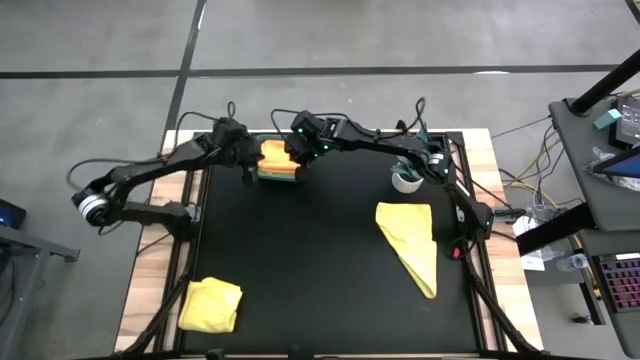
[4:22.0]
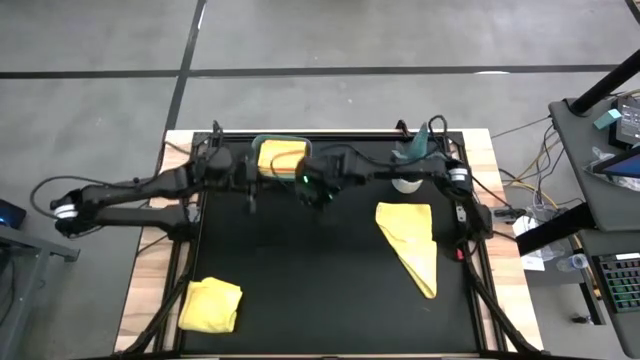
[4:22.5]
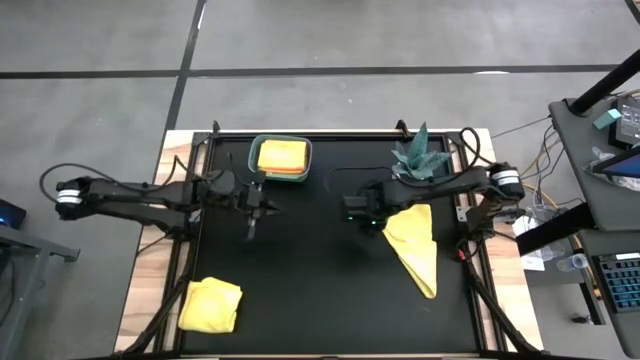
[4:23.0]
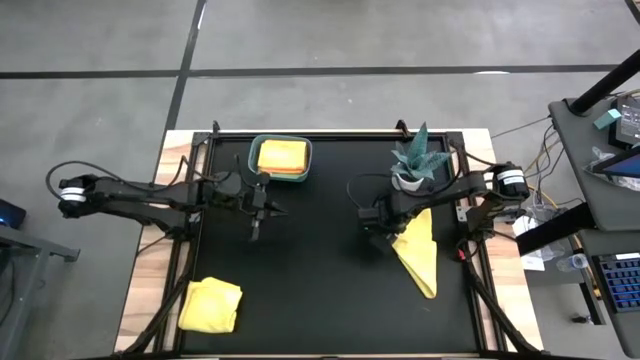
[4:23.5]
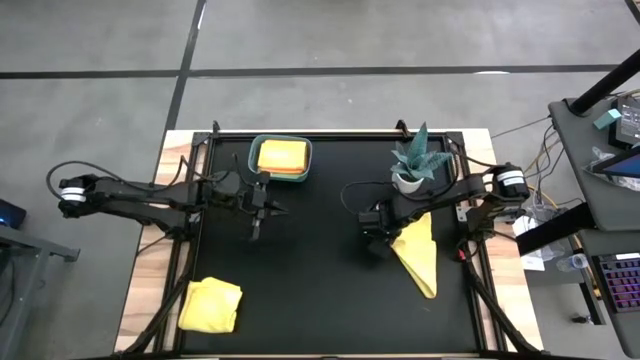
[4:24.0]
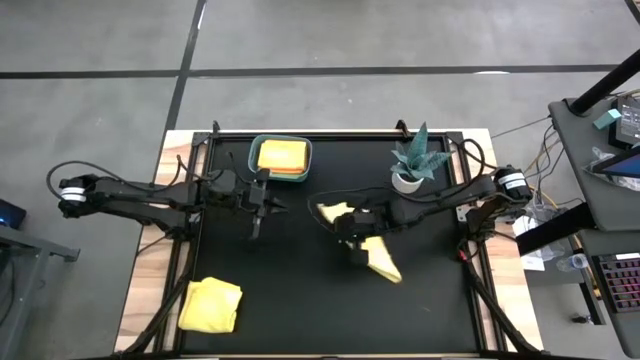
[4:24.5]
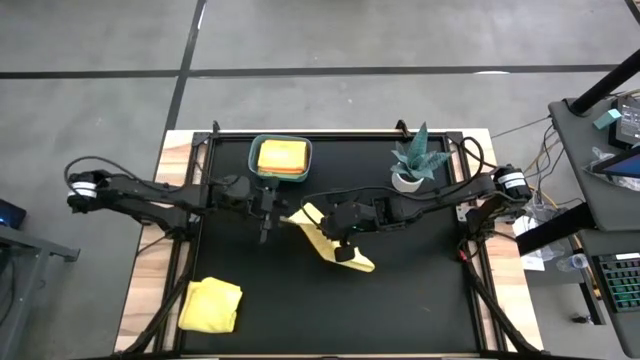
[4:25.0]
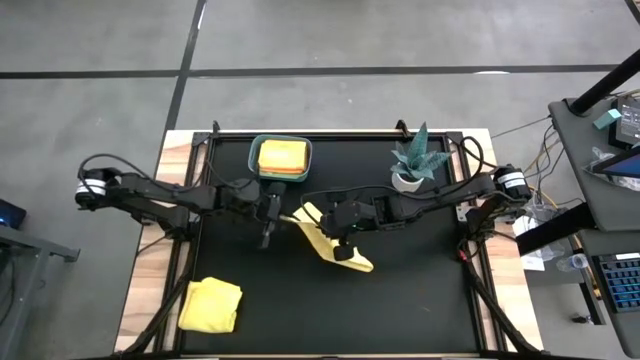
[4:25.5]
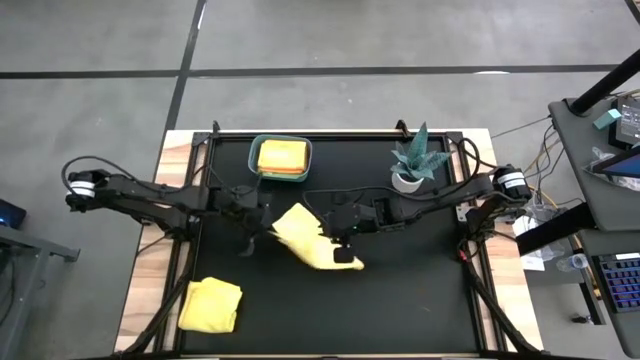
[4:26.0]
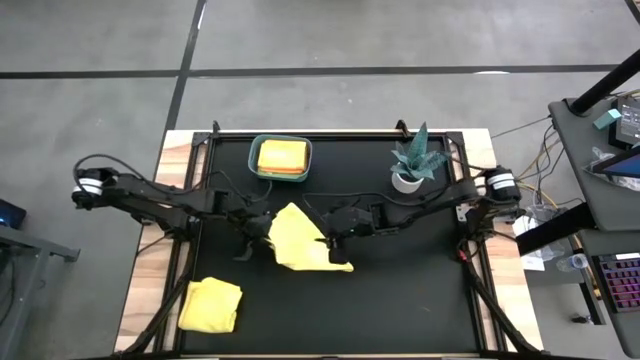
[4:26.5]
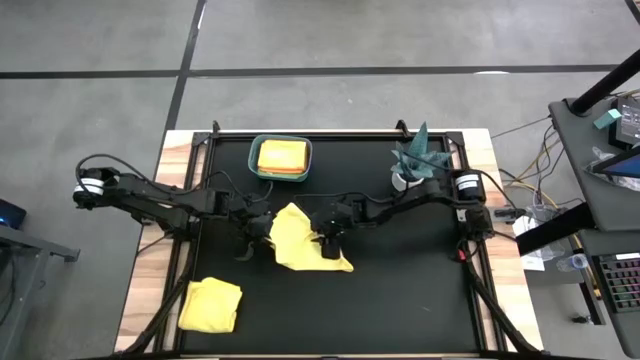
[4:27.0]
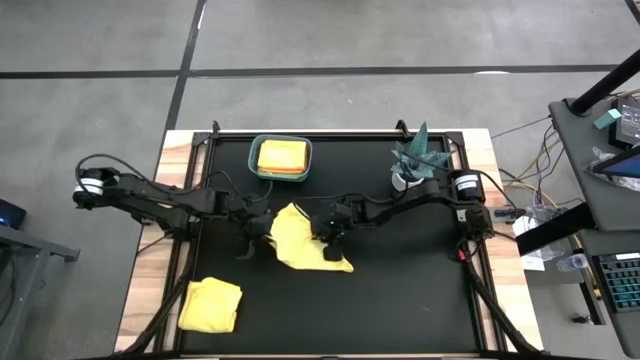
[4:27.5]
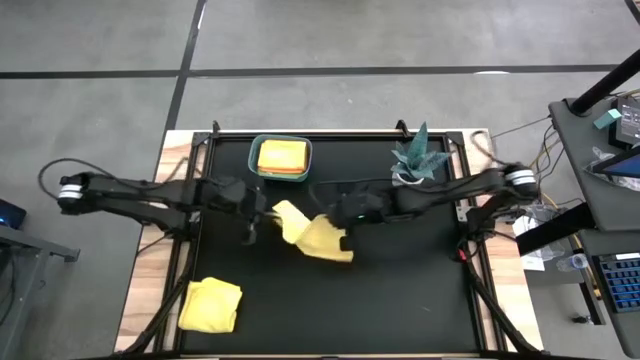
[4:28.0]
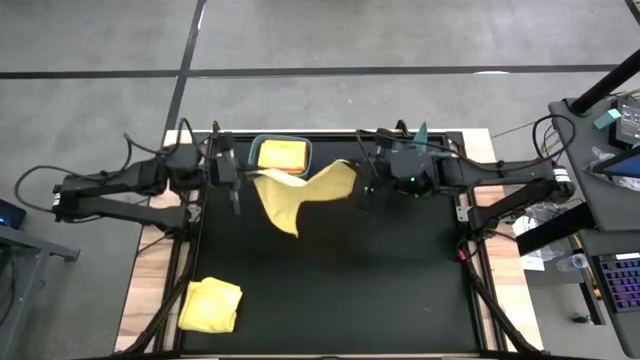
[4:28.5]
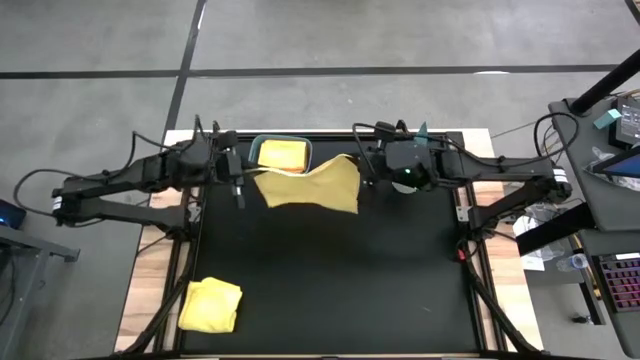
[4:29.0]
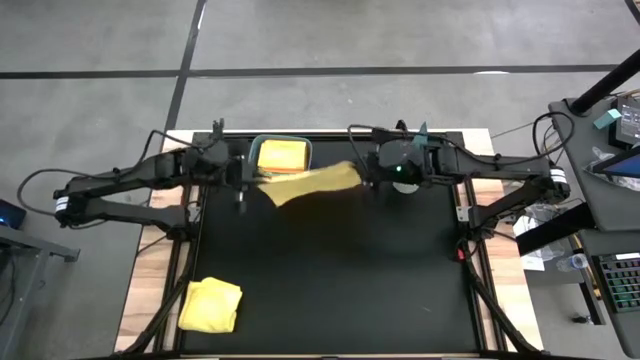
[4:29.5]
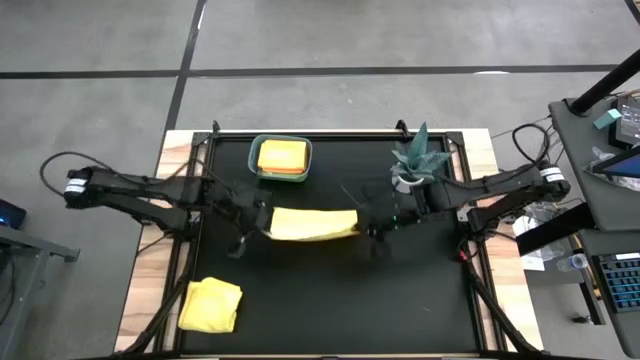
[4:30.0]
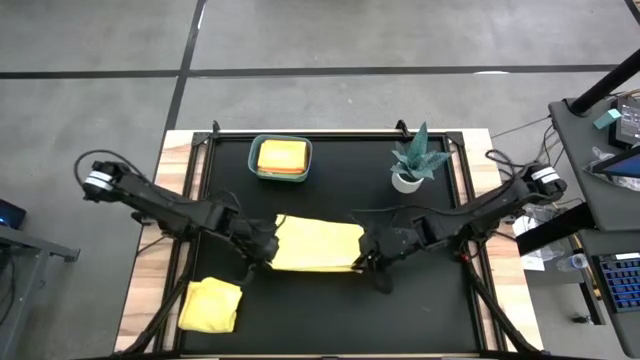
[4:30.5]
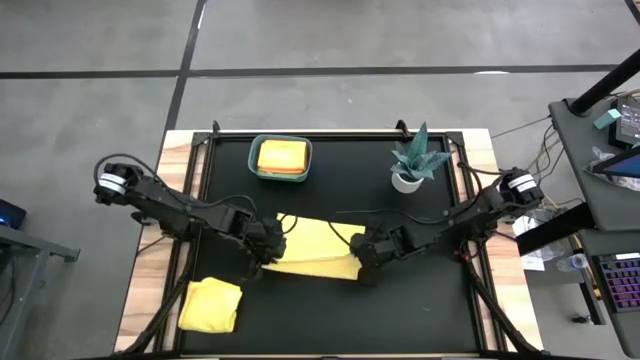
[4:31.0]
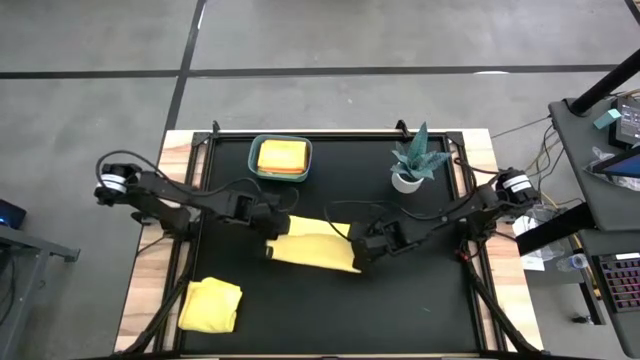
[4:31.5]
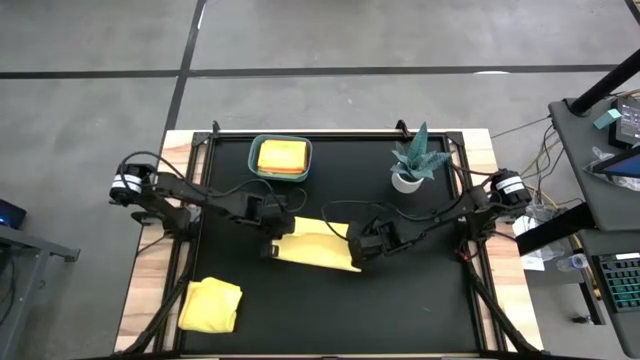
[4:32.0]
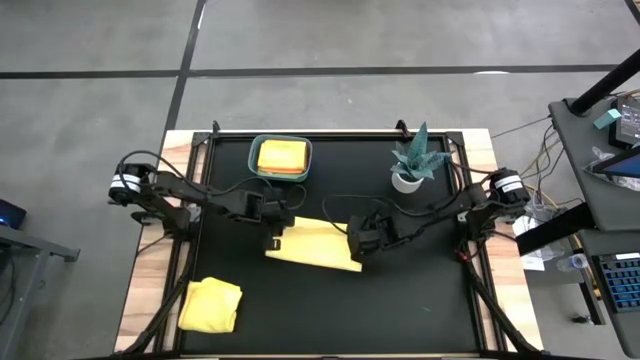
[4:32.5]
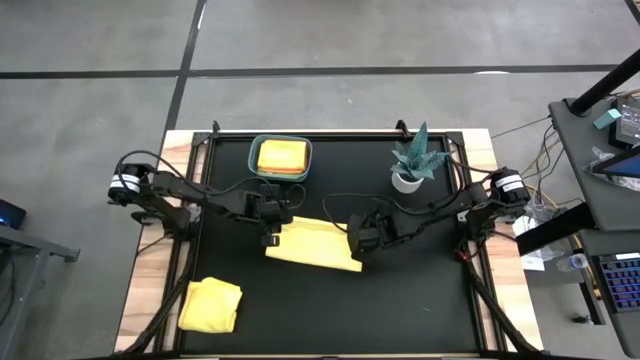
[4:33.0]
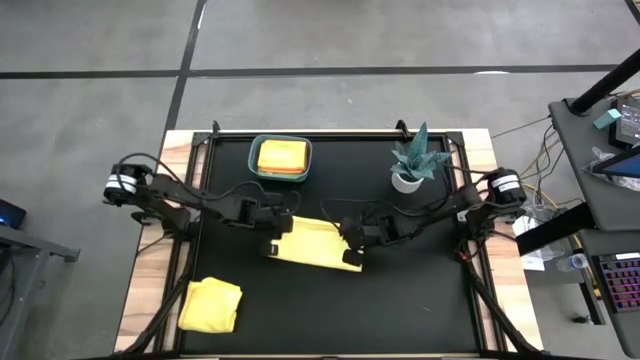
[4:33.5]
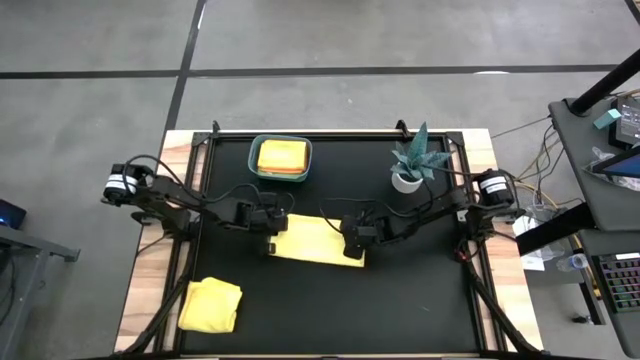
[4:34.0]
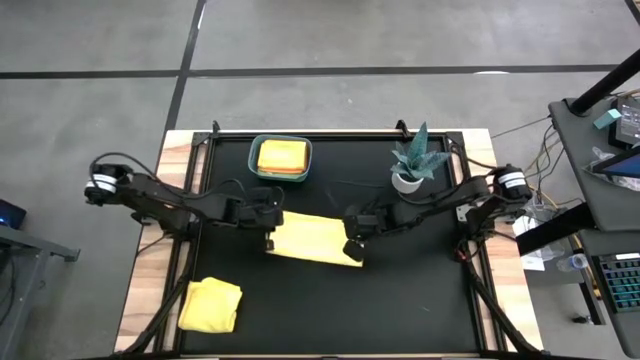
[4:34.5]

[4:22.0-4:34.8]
Task: Fold microfiber towels
Fold the right yellow microfiber cloth

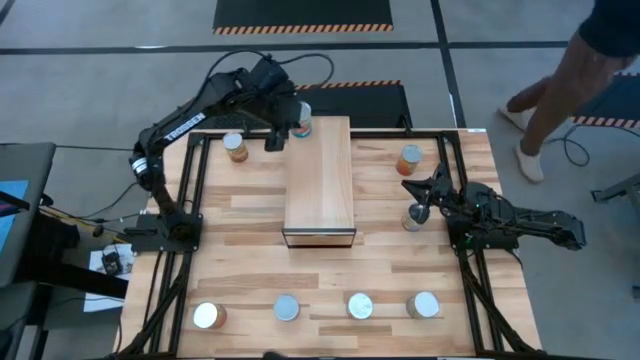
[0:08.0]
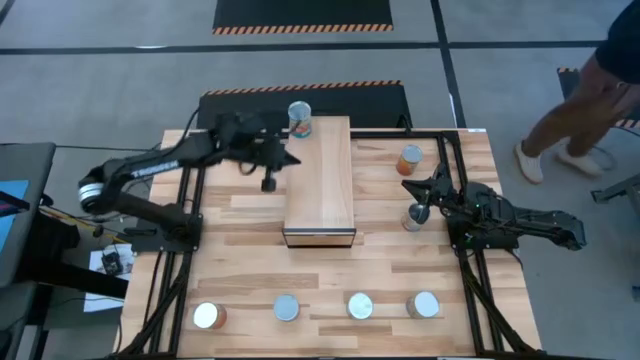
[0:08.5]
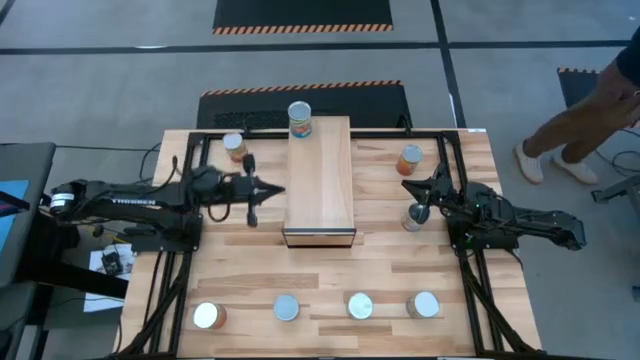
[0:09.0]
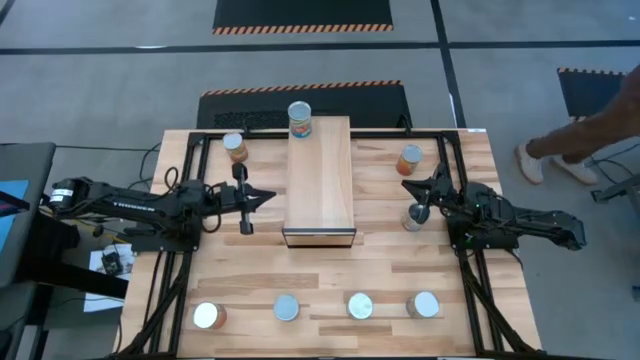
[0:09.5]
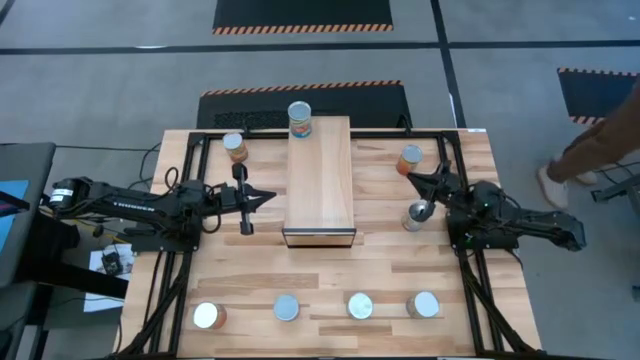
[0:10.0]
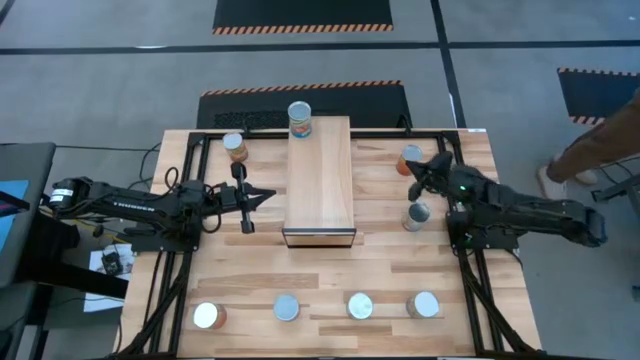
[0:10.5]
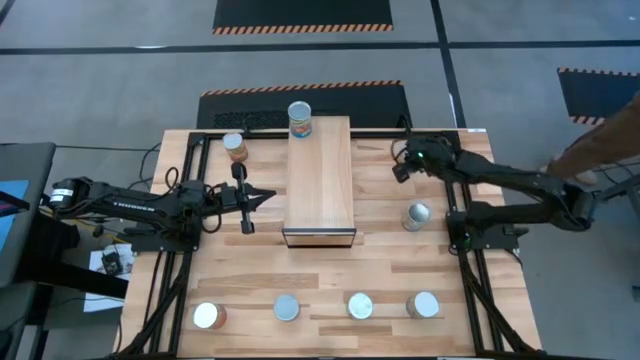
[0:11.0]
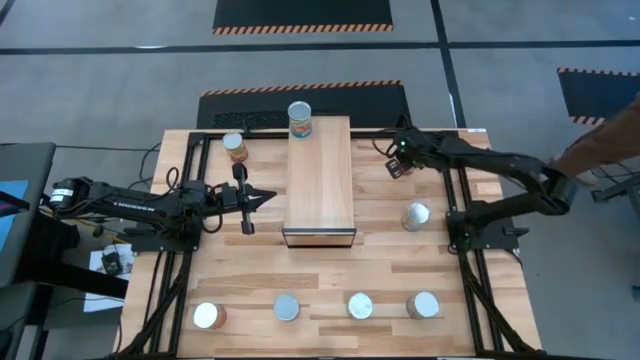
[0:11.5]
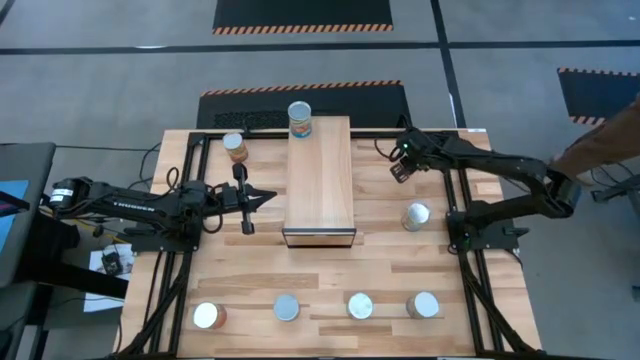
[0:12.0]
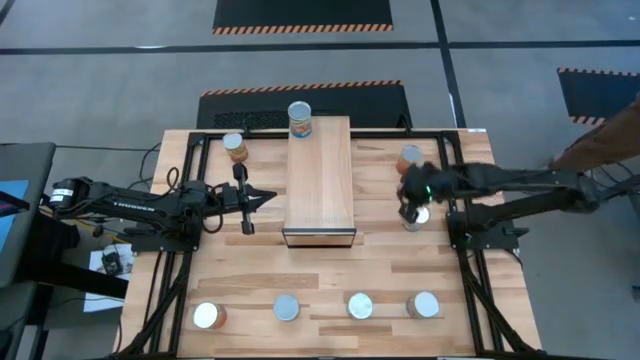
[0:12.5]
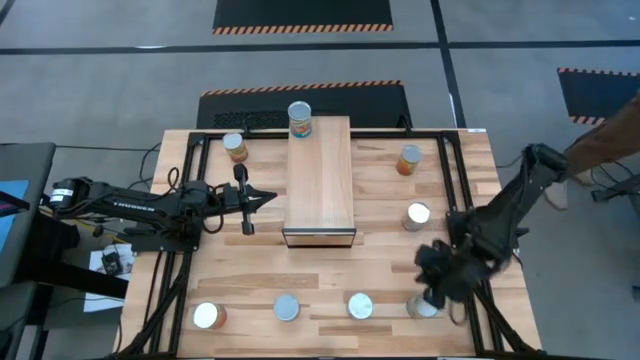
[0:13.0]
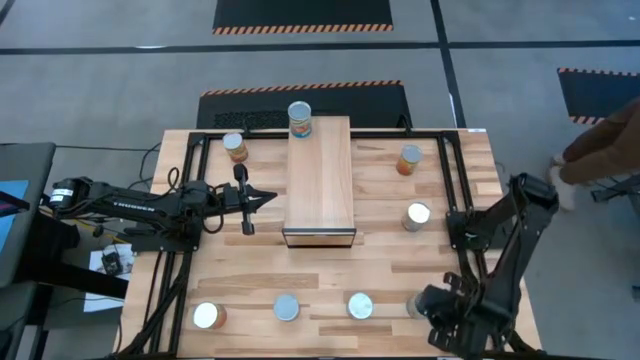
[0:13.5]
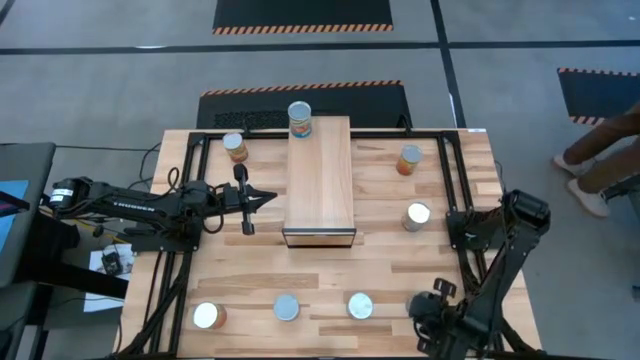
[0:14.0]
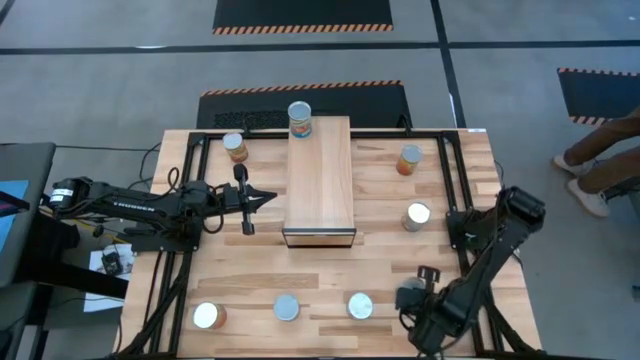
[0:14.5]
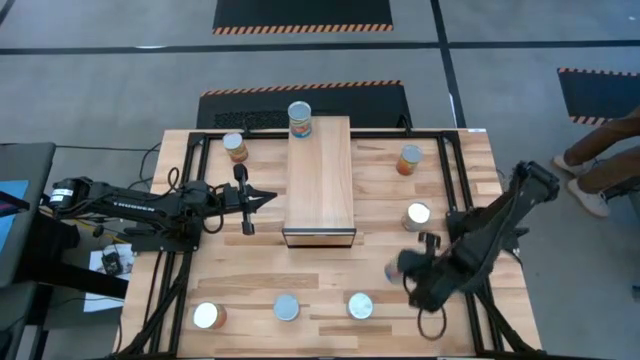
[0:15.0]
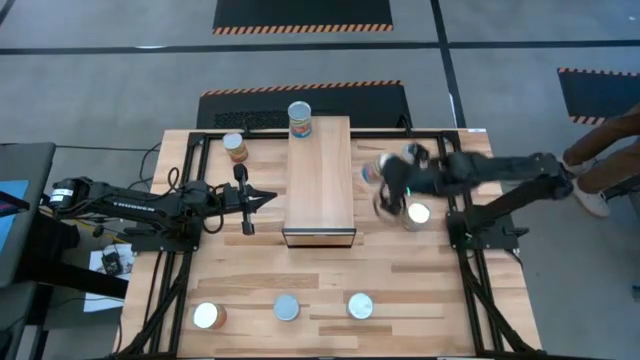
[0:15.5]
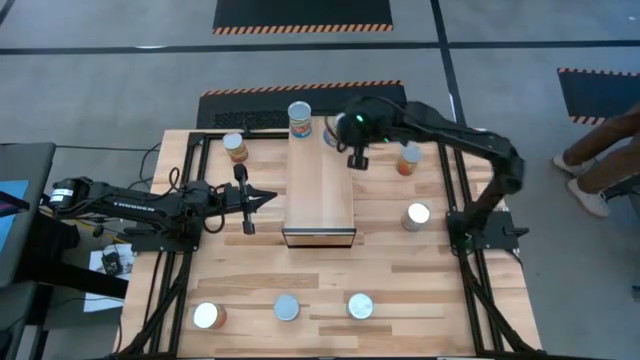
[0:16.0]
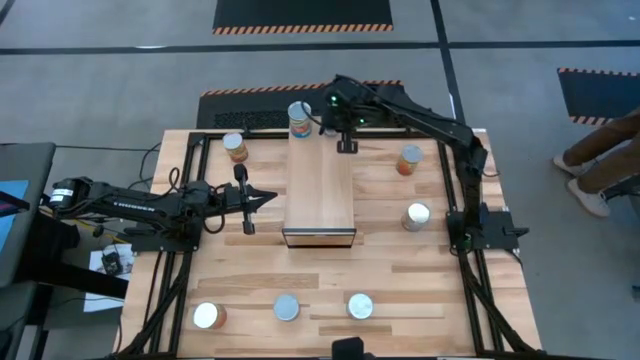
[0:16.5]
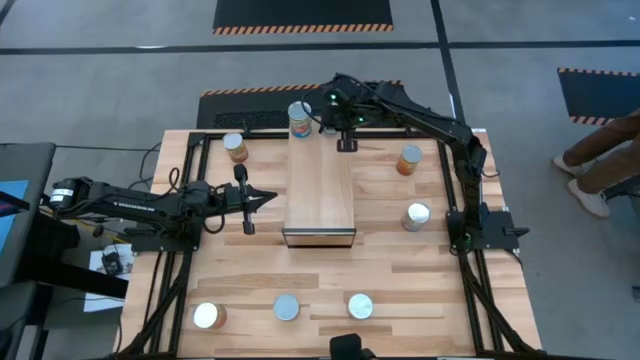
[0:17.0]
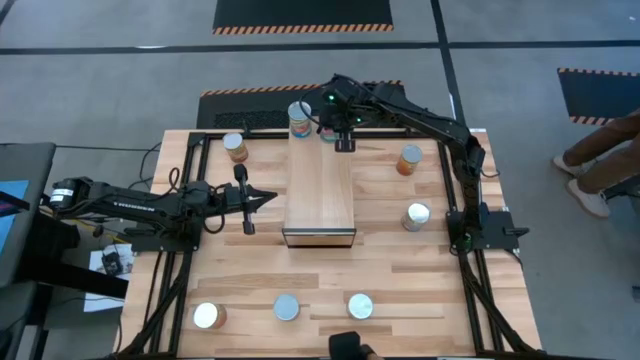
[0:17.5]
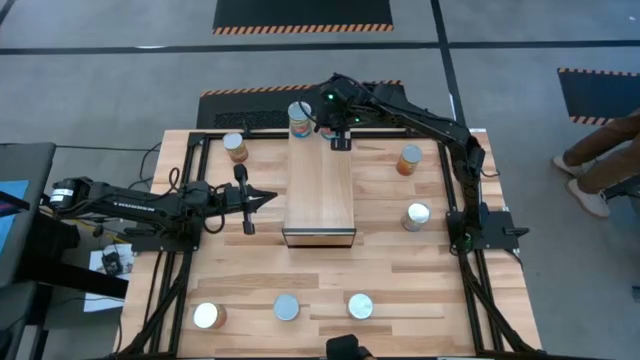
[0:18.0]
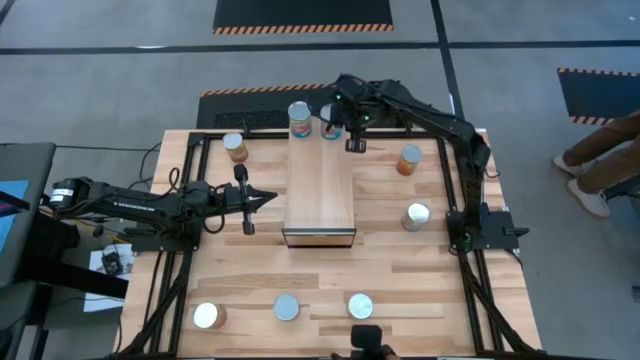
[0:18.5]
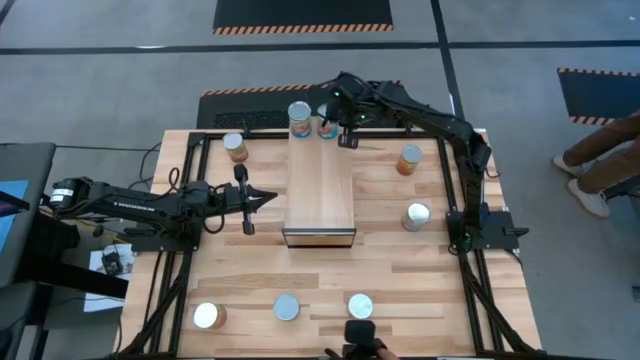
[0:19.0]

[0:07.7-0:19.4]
Task: Pick and place cans onto a shelf
Put the canned tomatoes on the shelf aligned with other canned tomatoes
